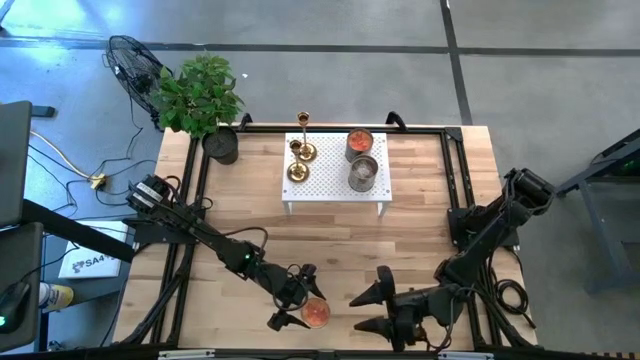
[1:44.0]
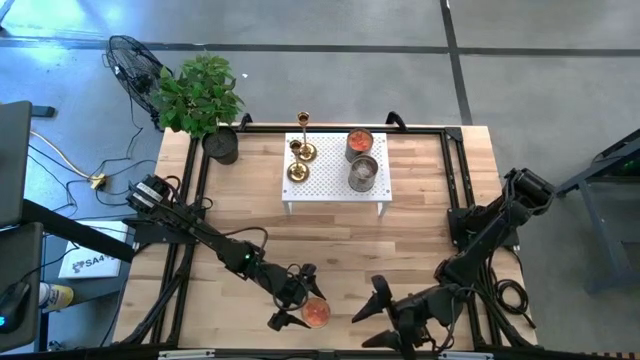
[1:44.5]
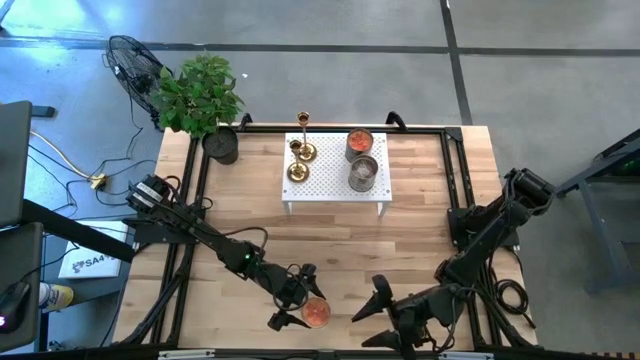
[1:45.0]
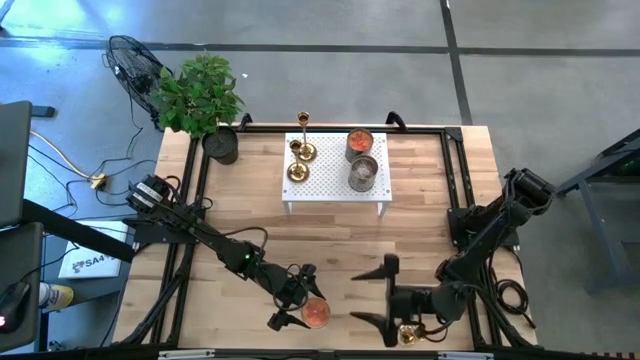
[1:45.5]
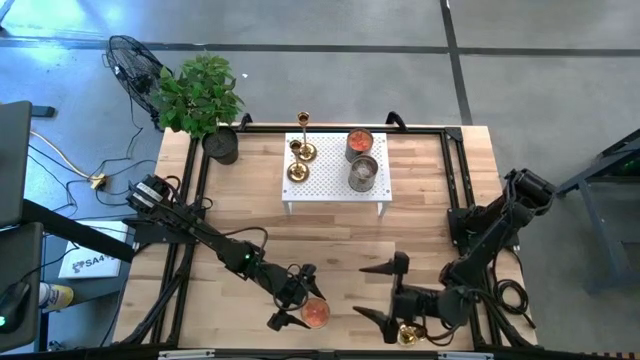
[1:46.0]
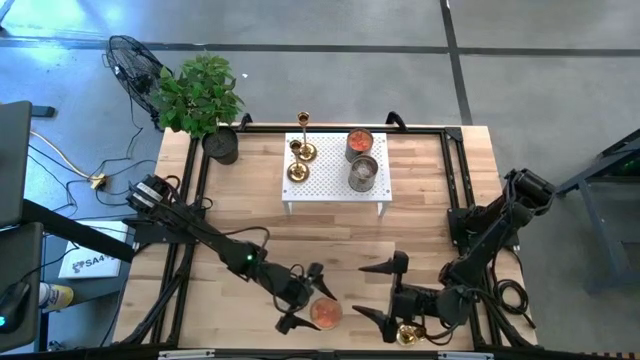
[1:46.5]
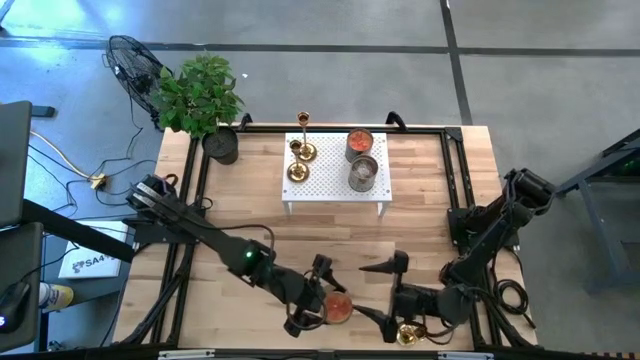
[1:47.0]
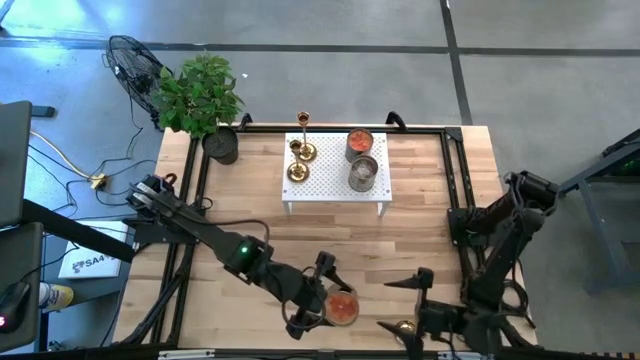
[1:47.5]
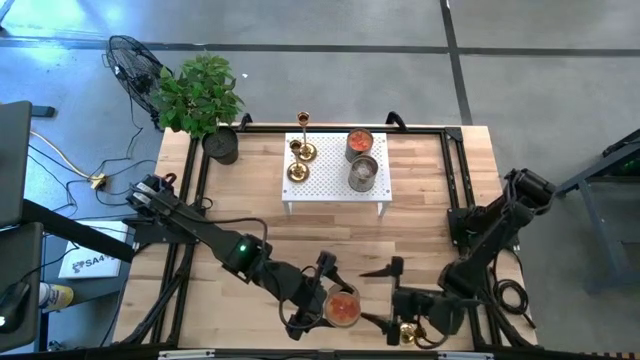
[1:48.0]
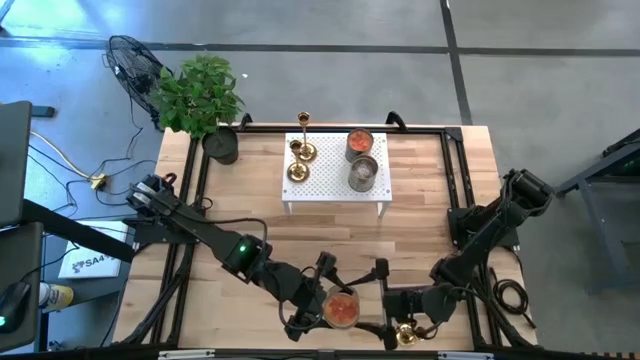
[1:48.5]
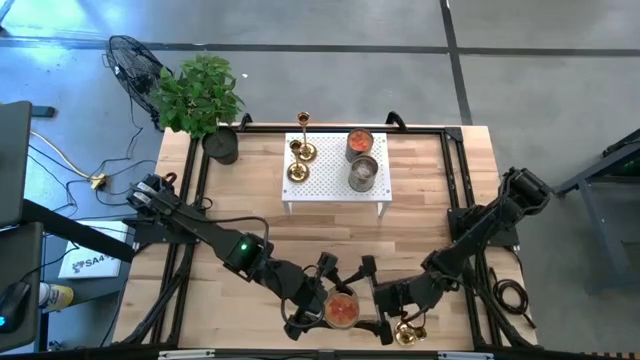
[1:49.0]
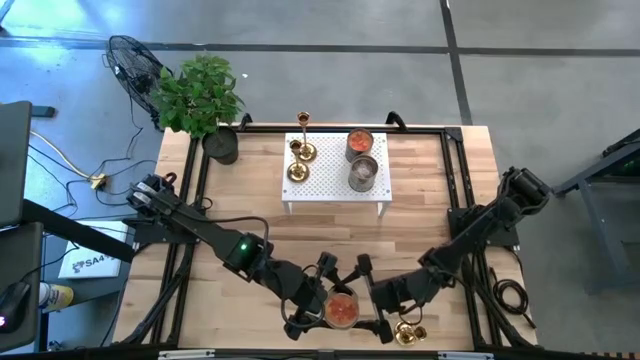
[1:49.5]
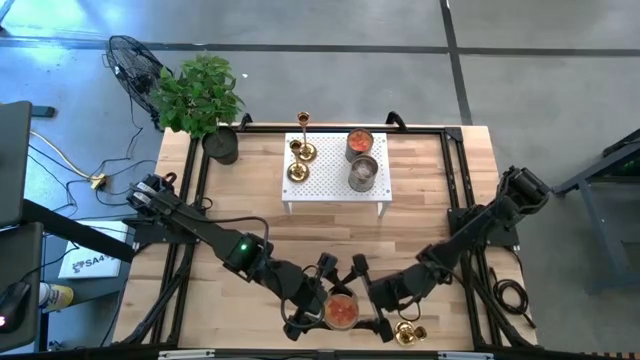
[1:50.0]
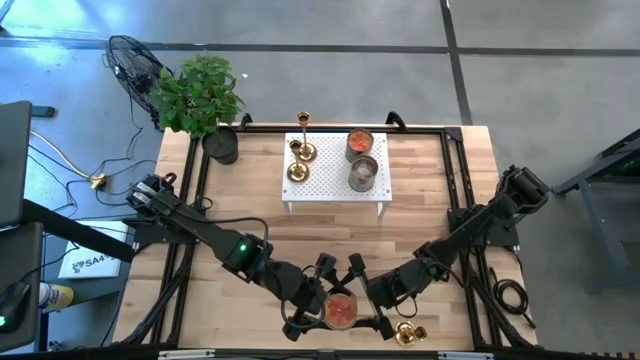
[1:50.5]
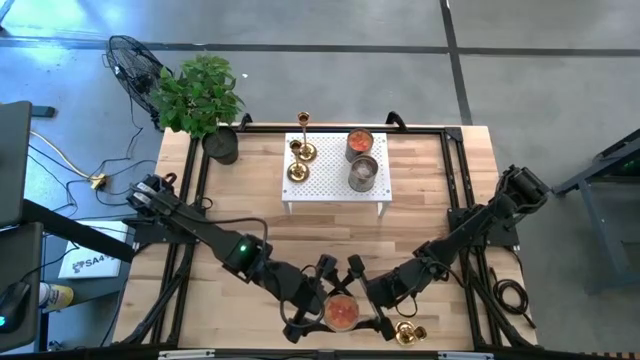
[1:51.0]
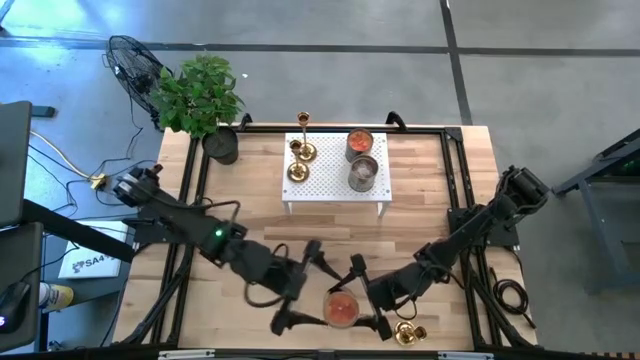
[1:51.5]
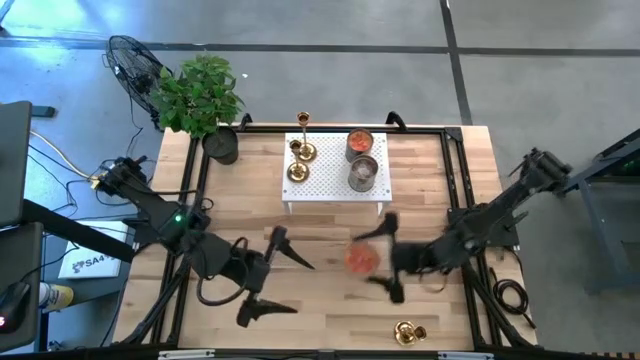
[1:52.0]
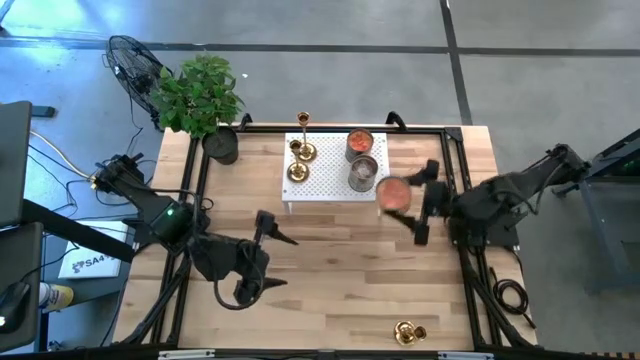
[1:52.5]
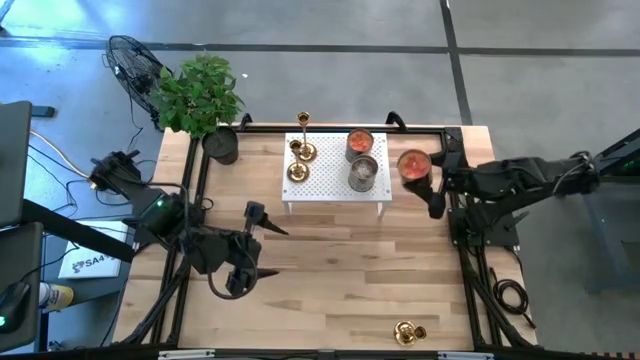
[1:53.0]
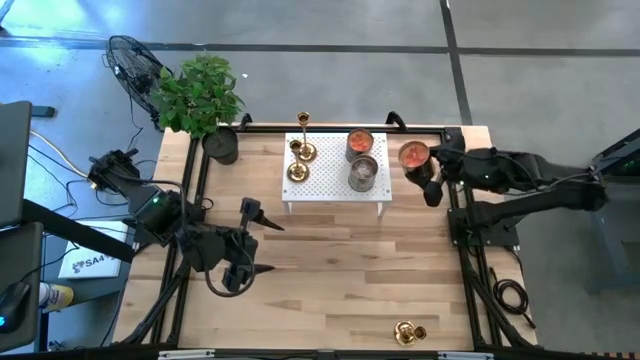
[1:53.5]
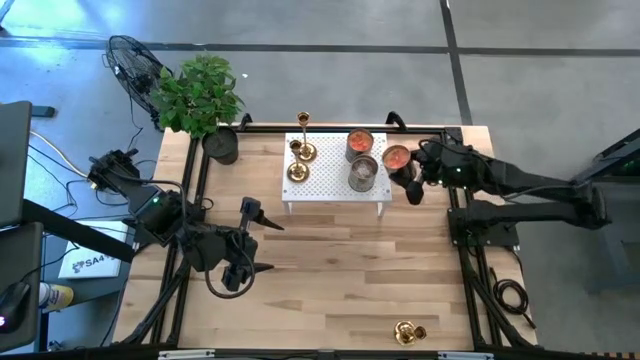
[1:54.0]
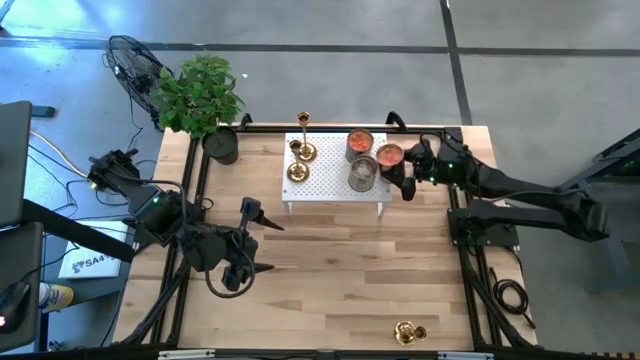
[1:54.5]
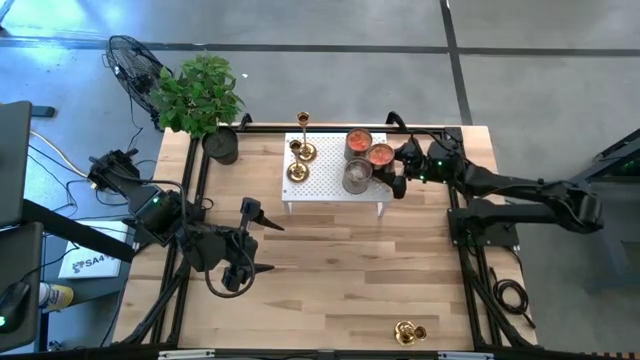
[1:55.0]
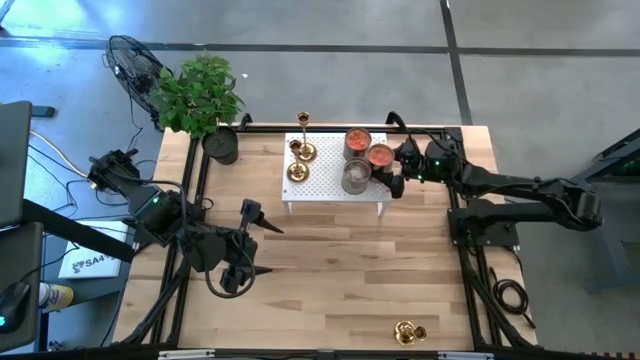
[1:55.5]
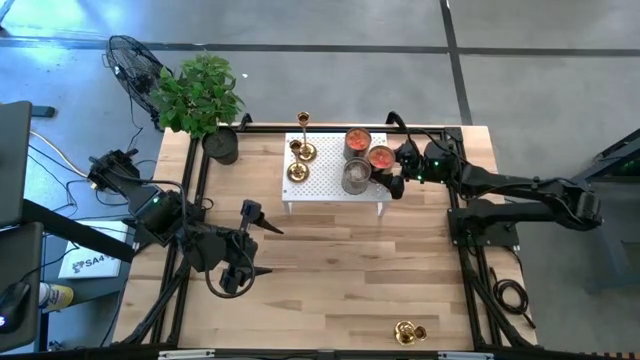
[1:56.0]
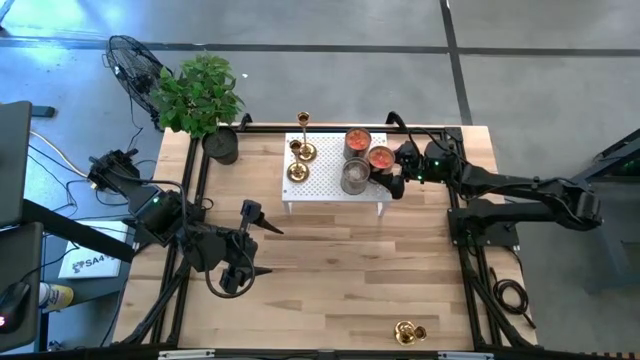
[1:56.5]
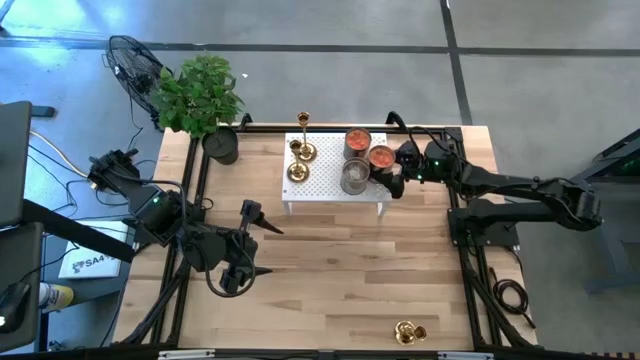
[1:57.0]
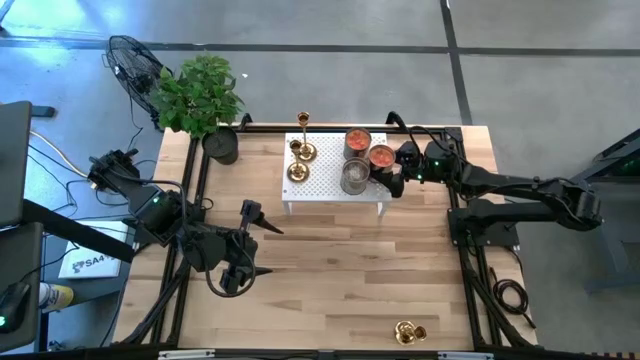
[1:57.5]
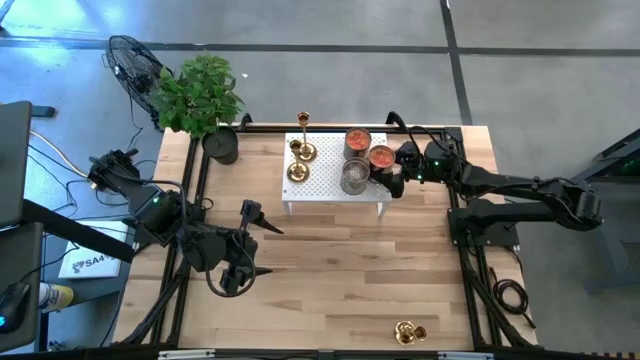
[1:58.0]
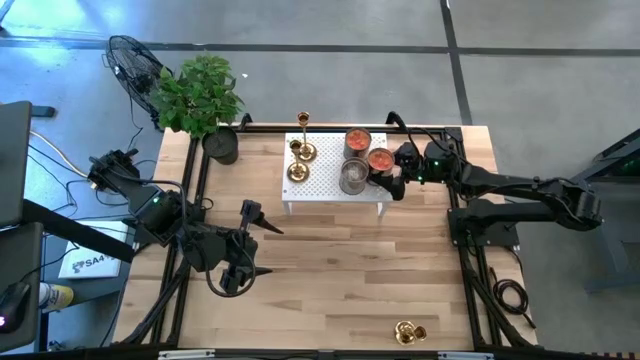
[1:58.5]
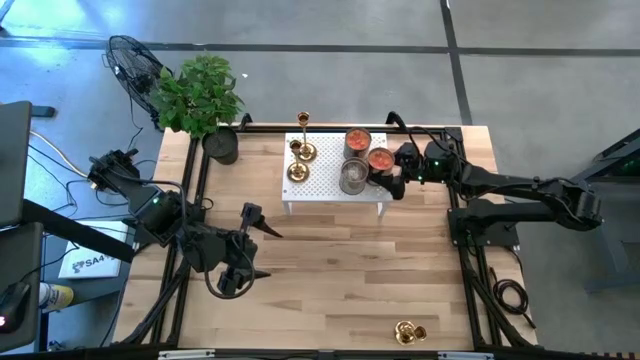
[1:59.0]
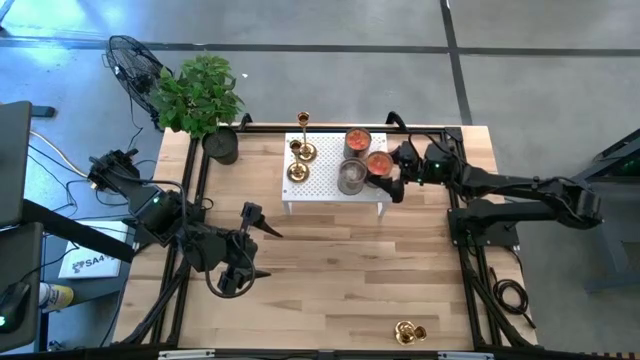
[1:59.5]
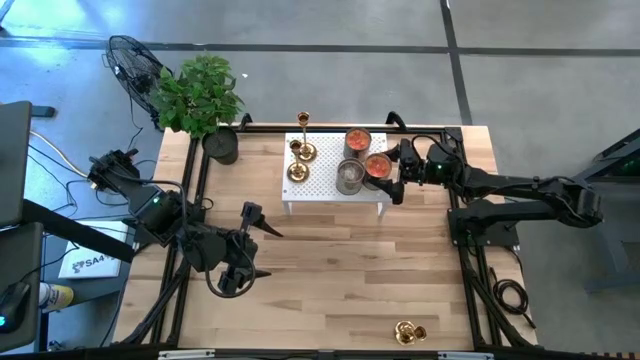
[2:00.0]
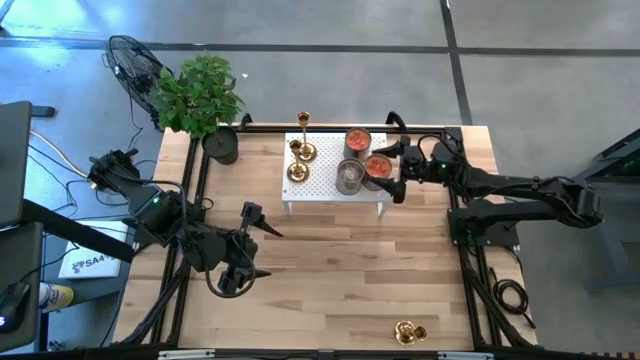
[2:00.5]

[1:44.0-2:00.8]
Task: Pick & Place candle stick holders
Put the orange candle on the shelf

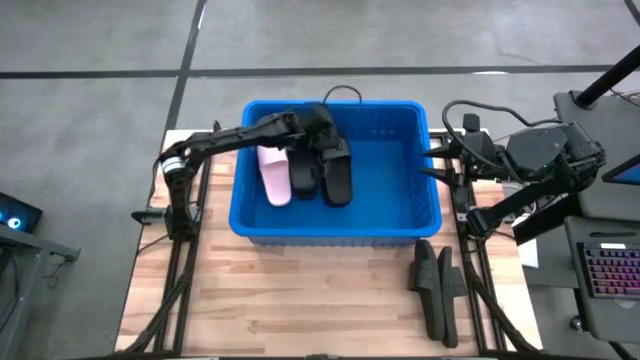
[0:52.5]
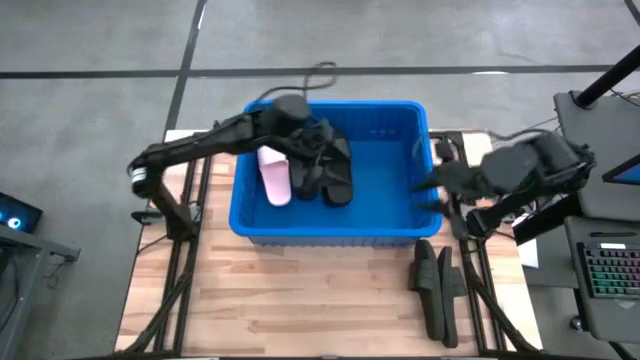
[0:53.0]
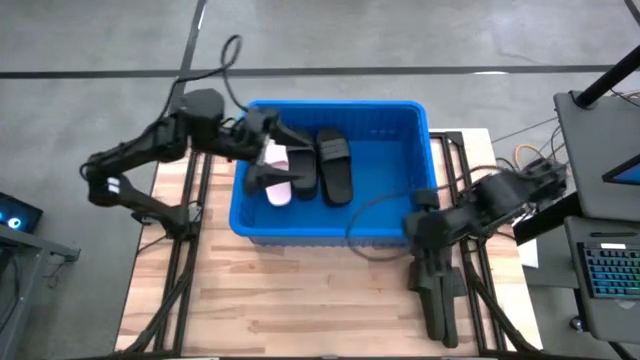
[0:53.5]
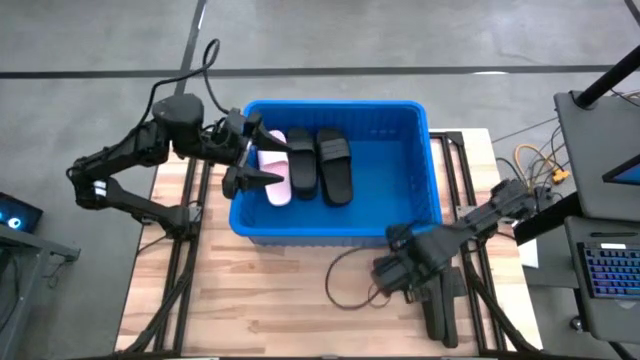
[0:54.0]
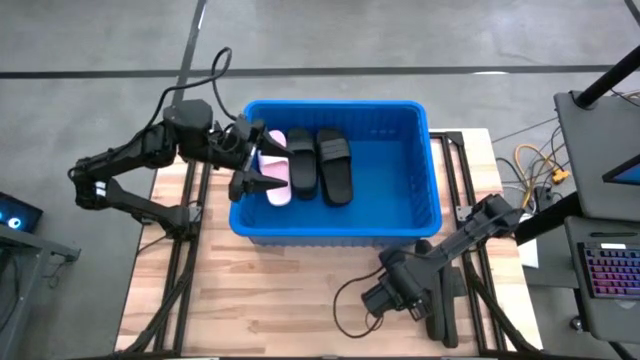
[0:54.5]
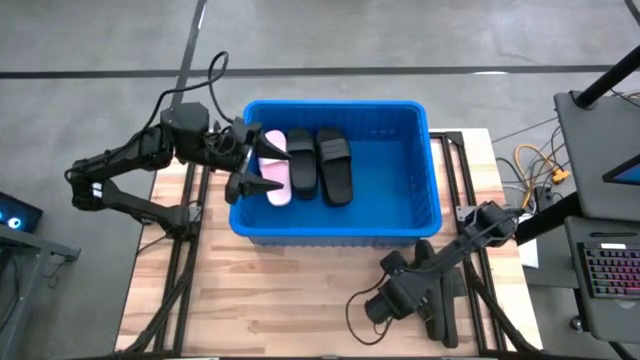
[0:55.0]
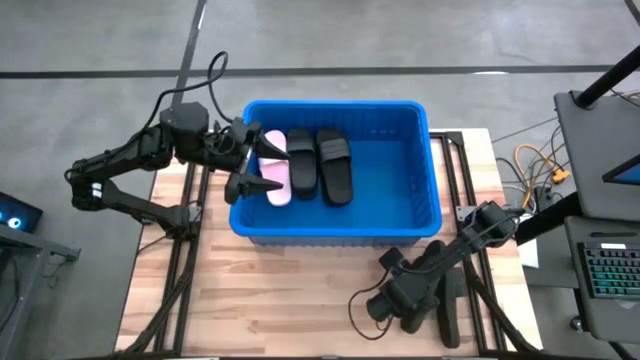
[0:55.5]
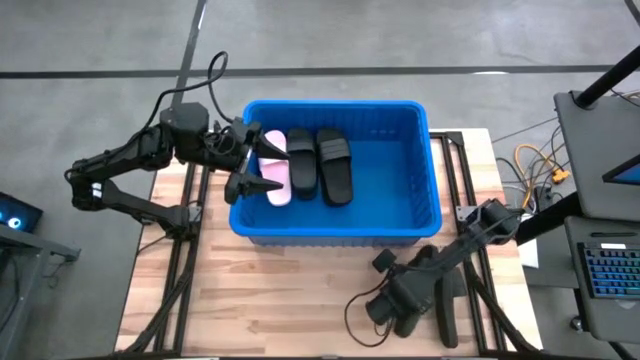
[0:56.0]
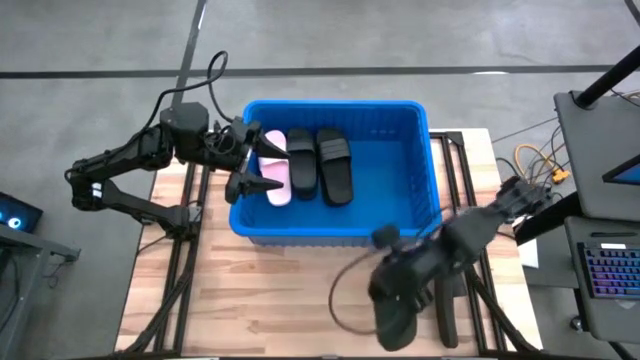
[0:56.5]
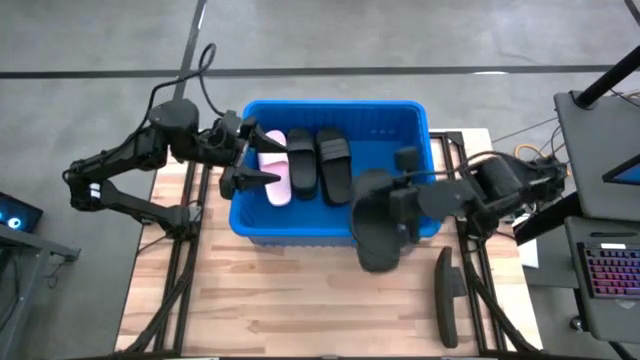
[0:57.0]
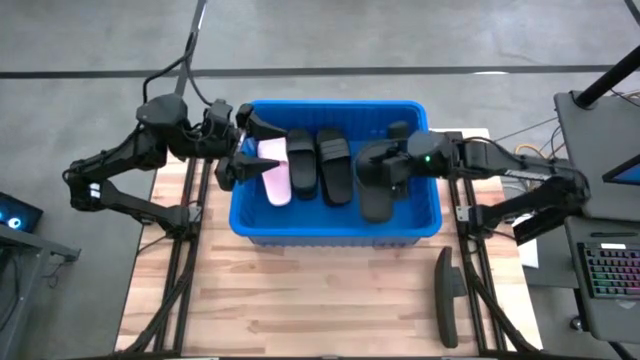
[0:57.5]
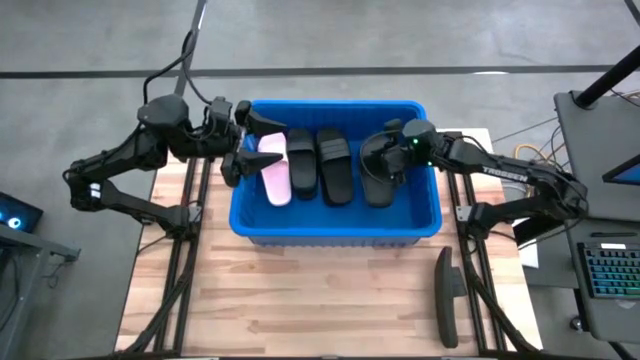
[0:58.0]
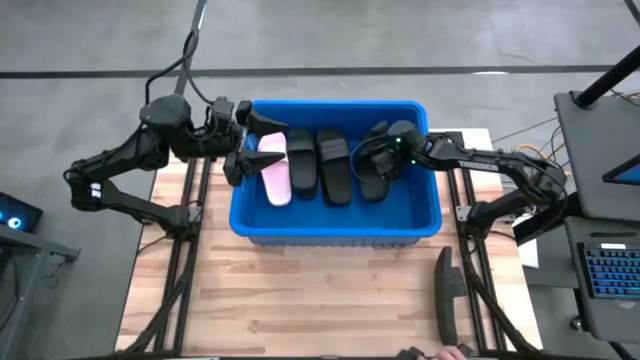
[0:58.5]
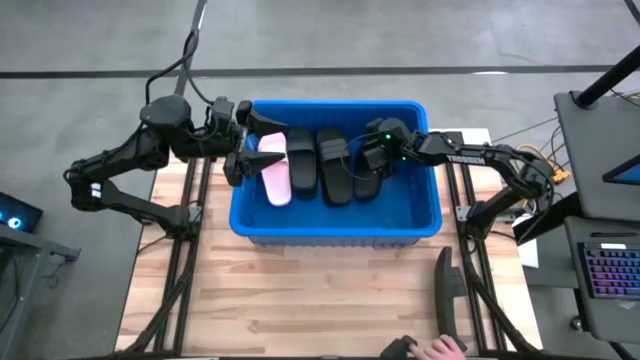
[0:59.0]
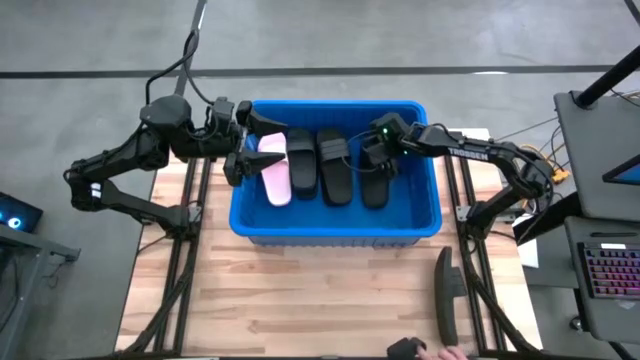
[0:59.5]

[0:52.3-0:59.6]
Task: Pick and place slides into bin
Put the left black slide into the bin
